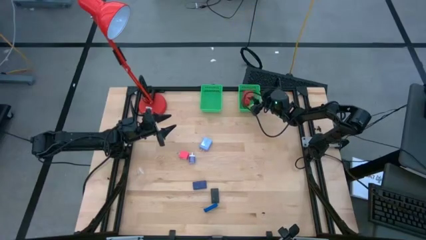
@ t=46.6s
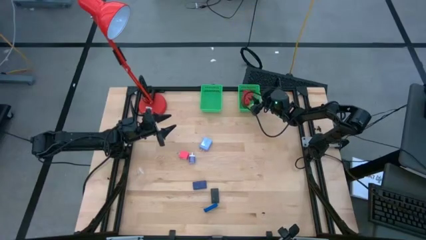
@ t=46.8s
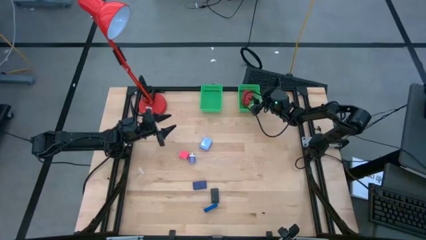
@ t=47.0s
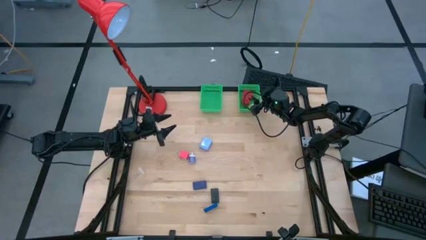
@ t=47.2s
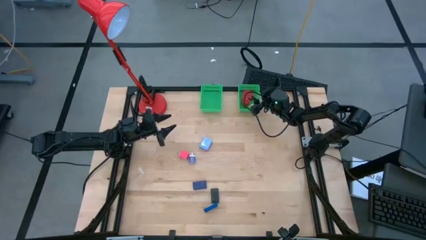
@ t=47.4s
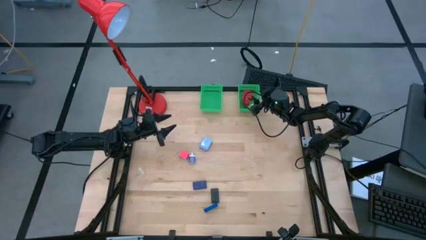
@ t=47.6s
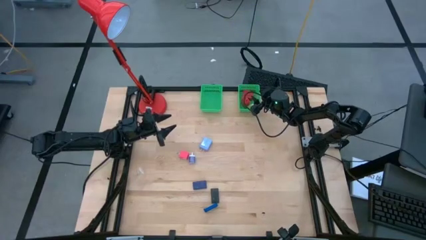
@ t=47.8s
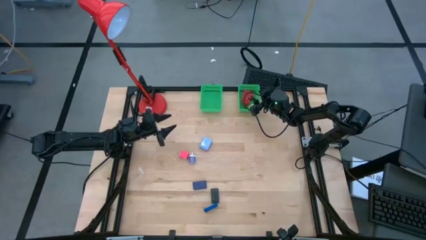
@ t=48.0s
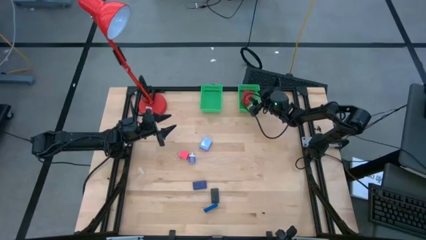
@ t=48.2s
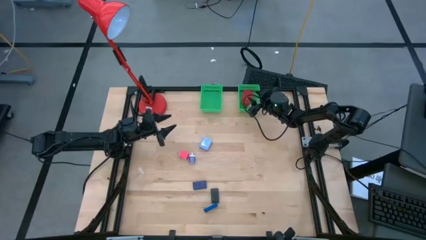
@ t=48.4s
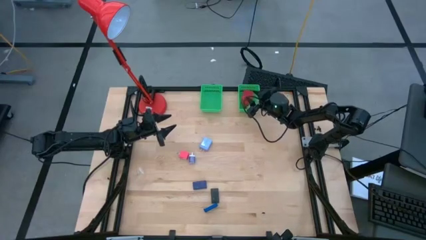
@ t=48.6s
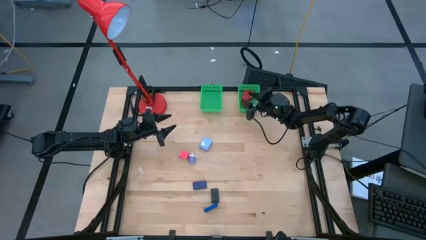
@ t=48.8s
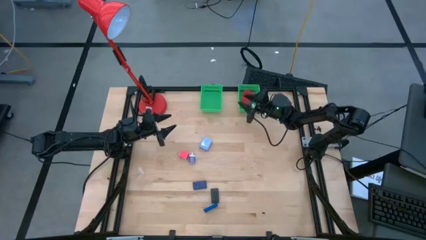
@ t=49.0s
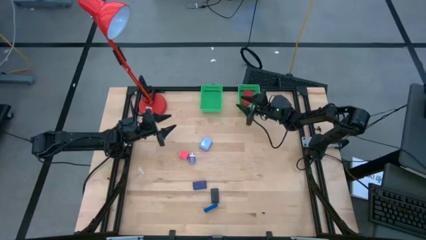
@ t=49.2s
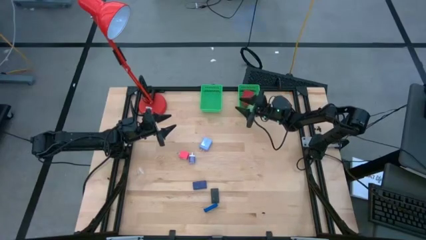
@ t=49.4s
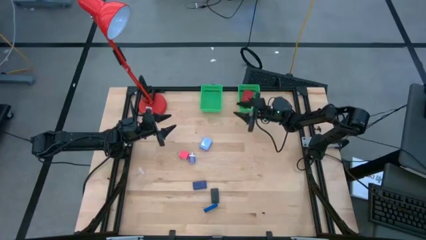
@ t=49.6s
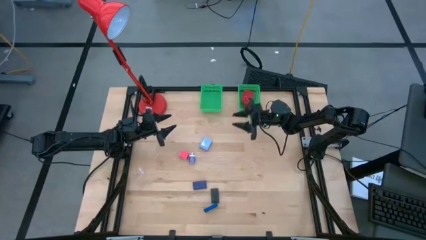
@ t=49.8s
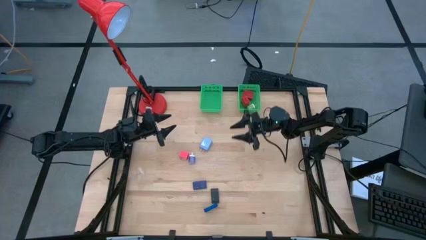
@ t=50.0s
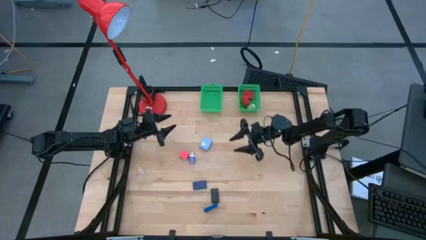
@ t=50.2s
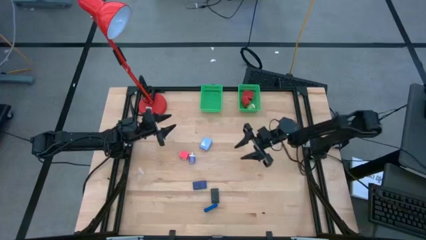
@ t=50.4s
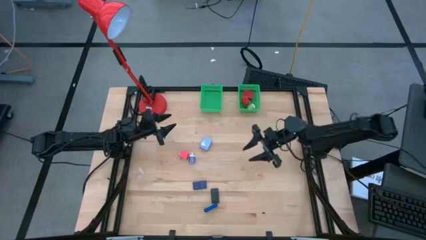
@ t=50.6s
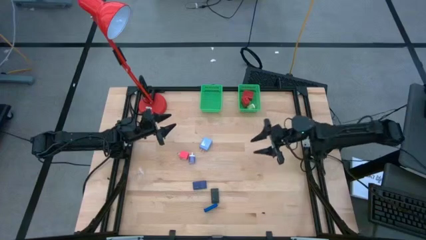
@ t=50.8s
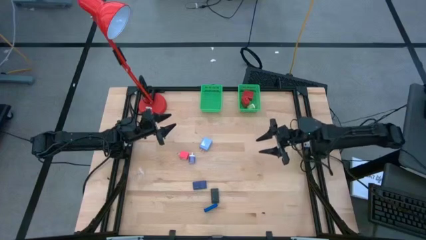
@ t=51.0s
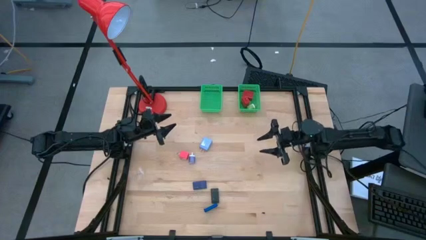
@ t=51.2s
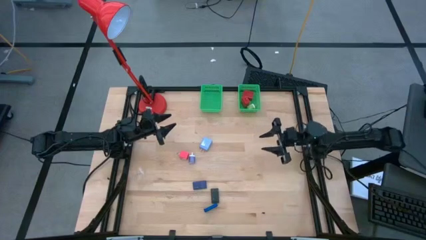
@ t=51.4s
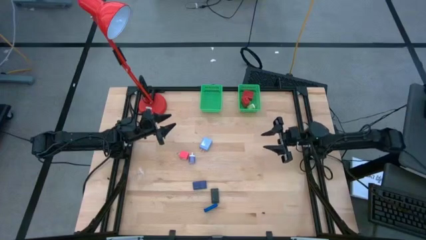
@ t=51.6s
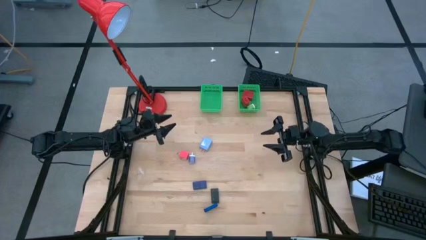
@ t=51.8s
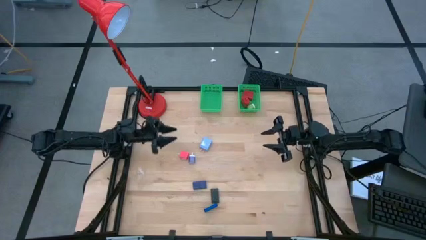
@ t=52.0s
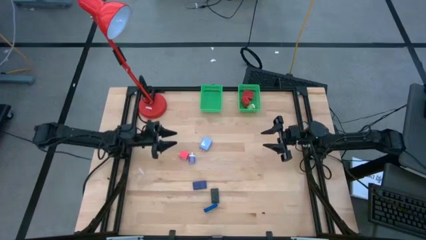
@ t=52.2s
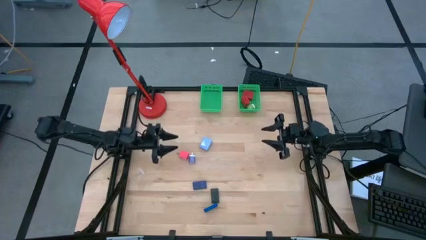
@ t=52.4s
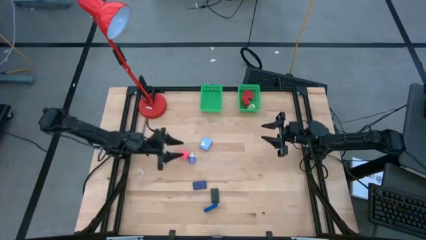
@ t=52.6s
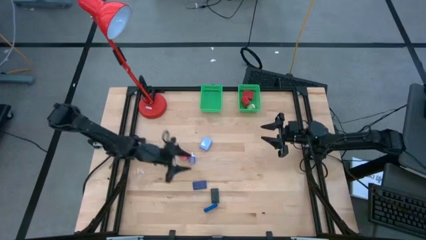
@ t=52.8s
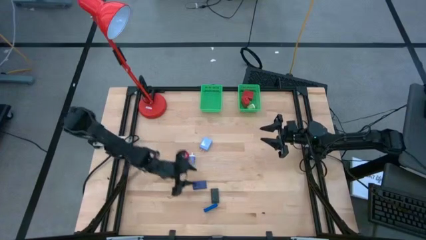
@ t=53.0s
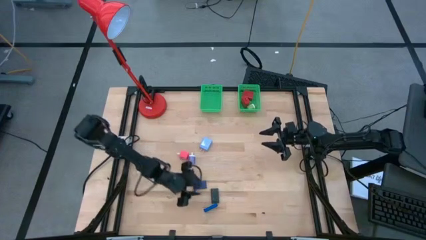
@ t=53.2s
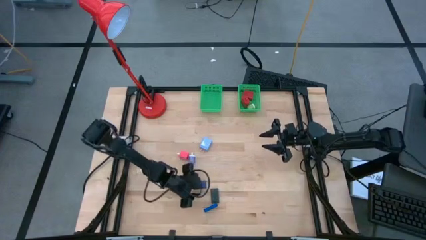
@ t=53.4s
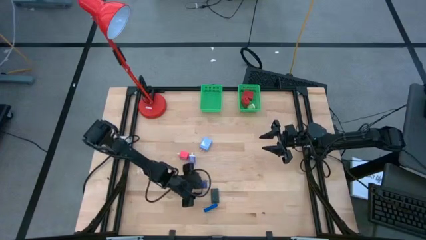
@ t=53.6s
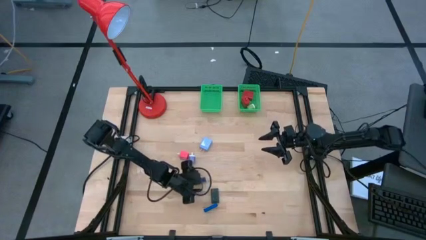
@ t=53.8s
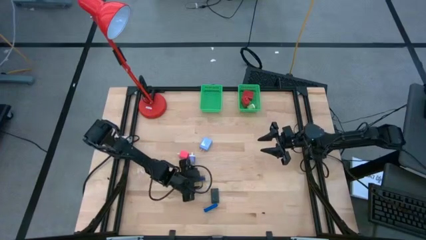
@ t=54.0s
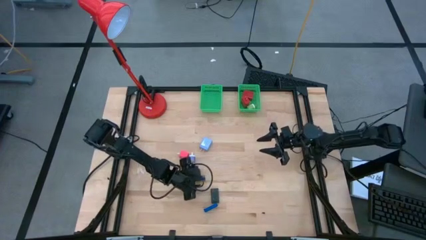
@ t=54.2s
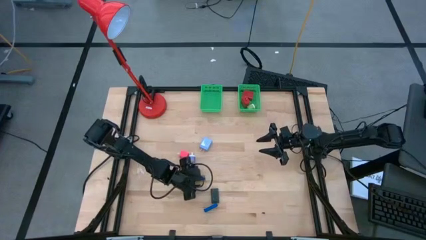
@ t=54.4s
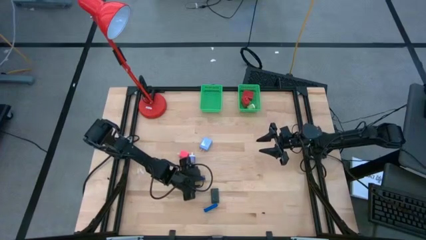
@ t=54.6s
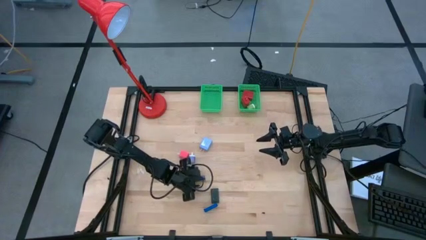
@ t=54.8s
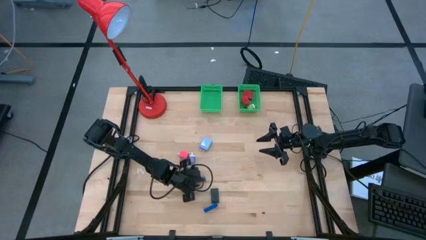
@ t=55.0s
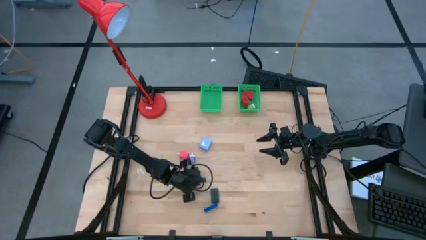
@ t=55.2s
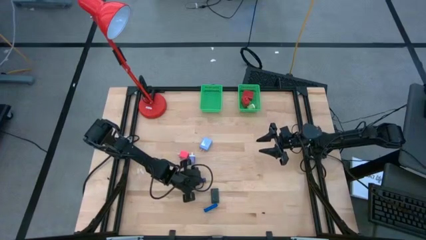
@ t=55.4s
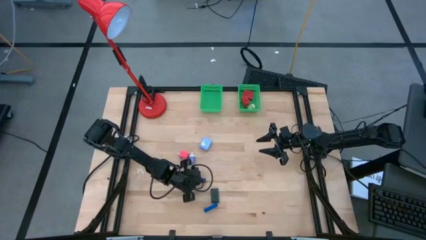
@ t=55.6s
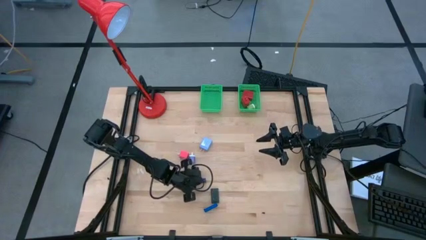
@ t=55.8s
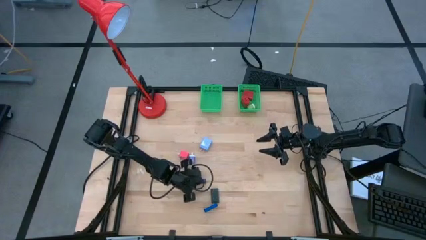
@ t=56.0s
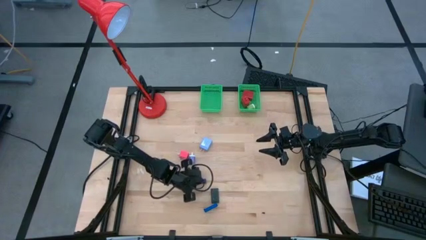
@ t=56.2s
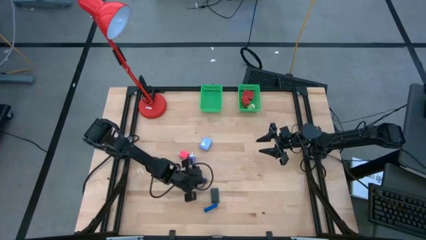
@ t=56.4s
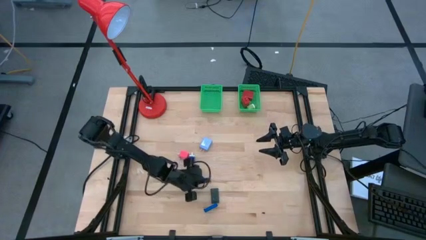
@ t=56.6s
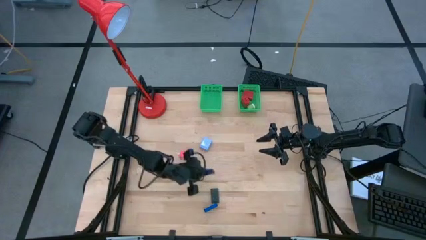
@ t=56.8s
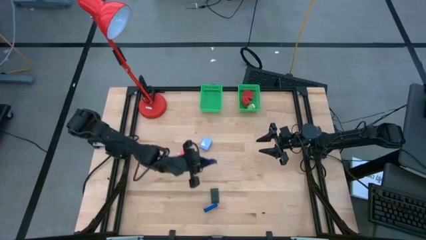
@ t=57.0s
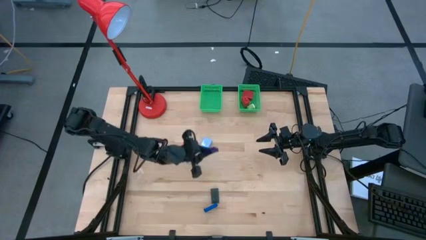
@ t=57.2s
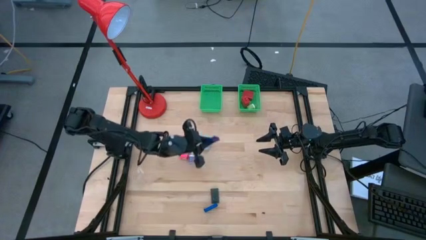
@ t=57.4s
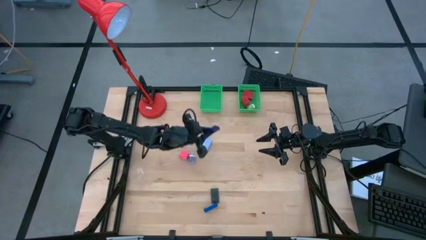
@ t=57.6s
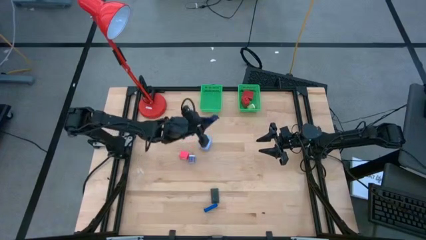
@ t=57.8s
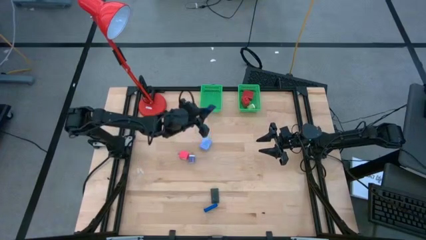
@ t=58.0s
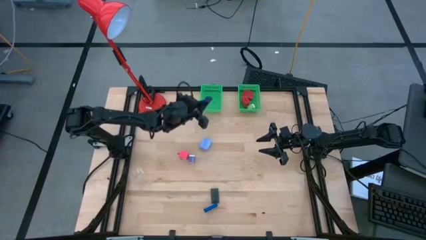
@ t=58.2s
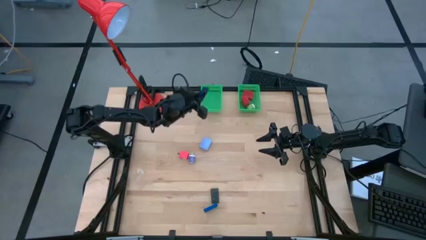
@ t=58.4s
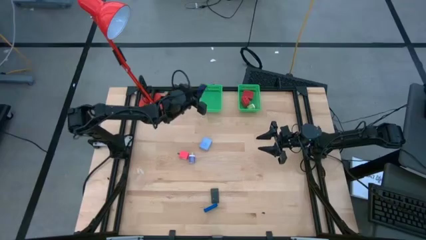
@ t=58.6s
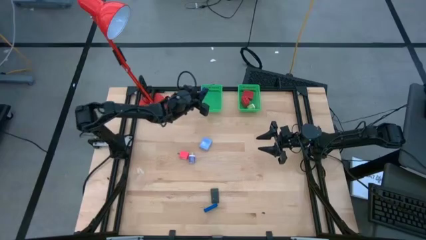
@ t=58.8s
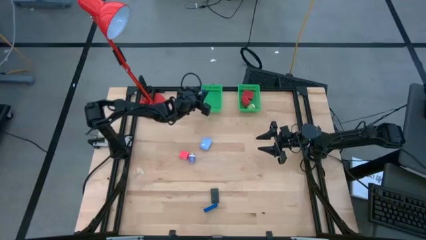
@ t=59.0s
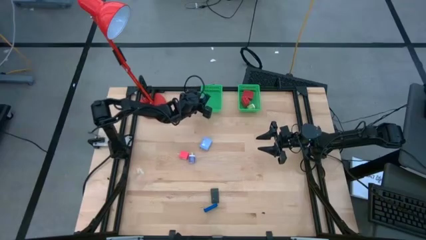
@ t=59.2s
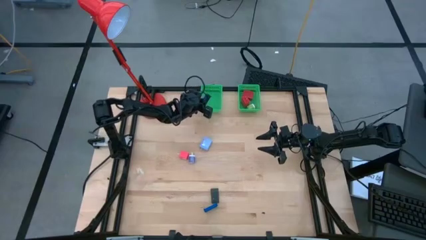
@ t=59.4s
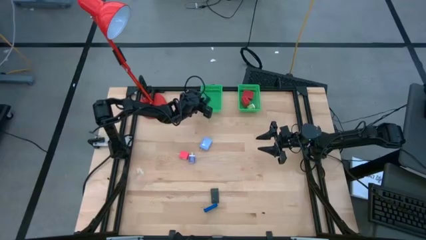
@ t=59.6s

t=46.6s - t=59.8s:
Task: Pick & Place Office items
Put the top blue digital timer into left green basket

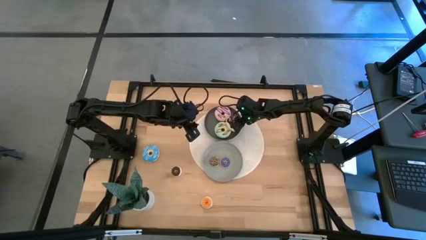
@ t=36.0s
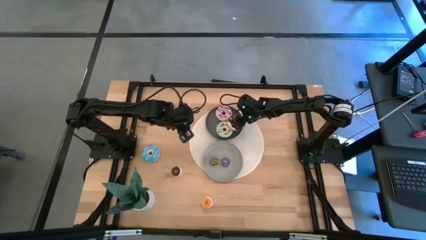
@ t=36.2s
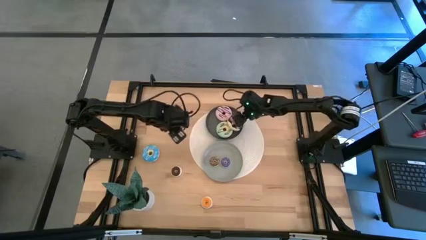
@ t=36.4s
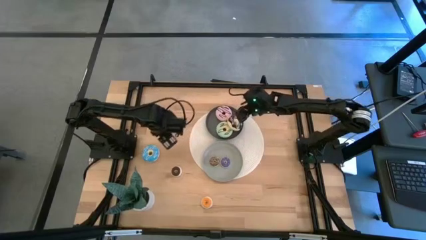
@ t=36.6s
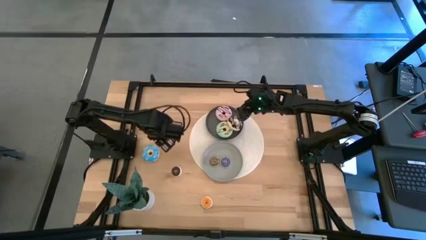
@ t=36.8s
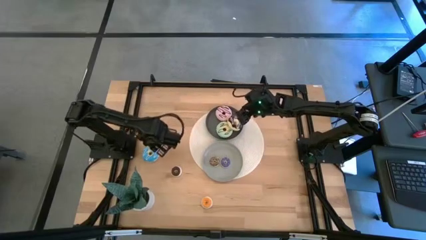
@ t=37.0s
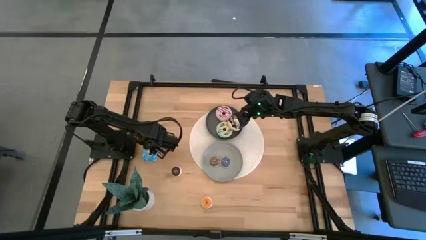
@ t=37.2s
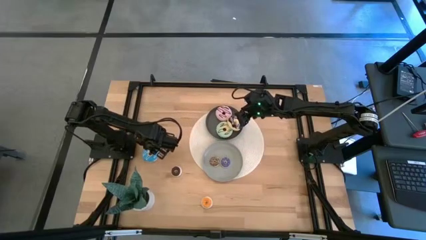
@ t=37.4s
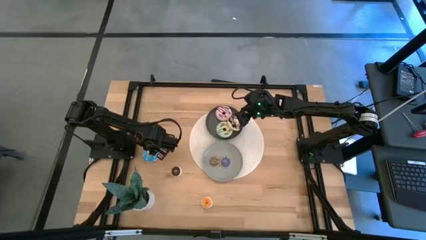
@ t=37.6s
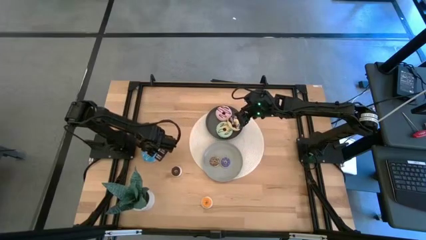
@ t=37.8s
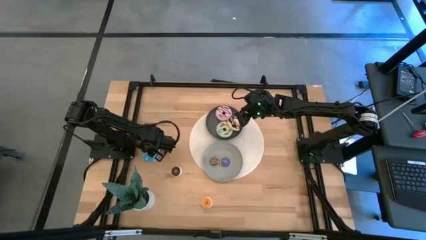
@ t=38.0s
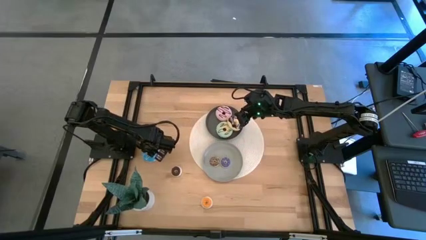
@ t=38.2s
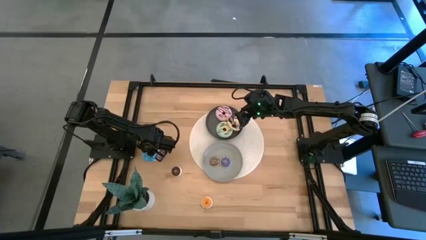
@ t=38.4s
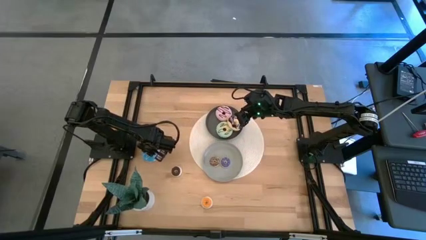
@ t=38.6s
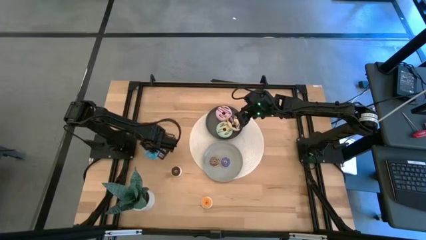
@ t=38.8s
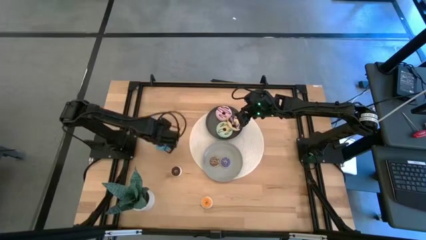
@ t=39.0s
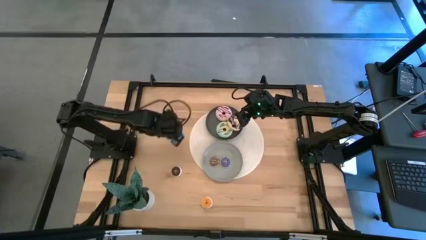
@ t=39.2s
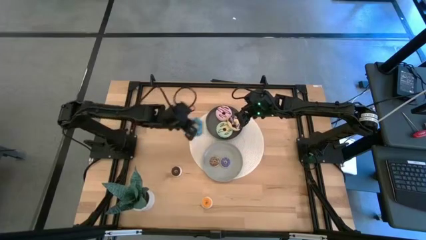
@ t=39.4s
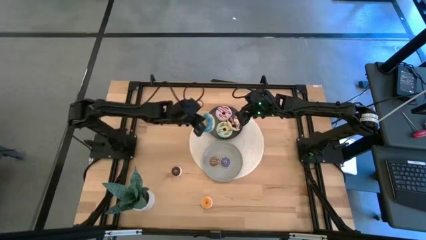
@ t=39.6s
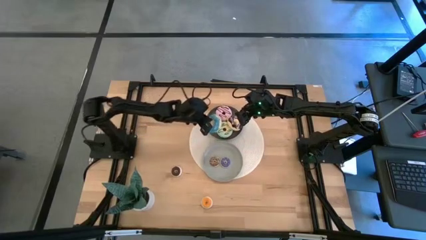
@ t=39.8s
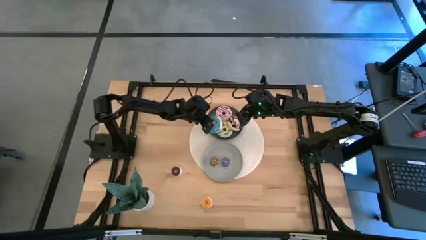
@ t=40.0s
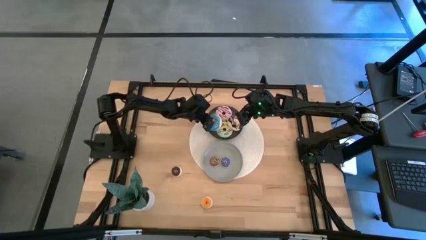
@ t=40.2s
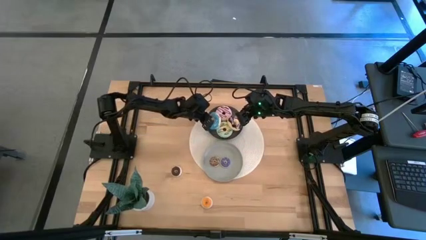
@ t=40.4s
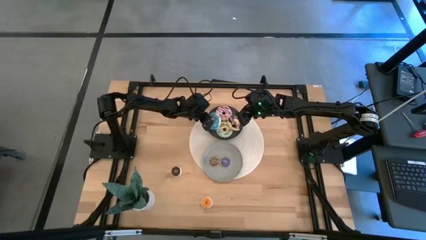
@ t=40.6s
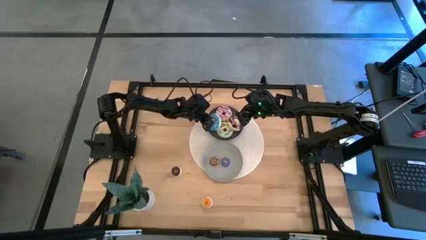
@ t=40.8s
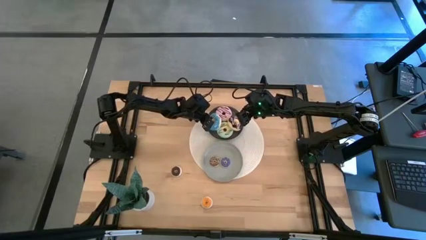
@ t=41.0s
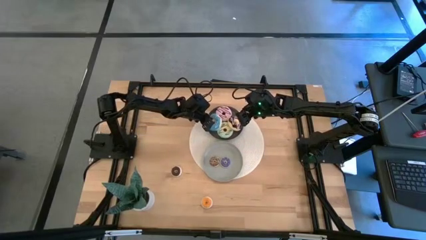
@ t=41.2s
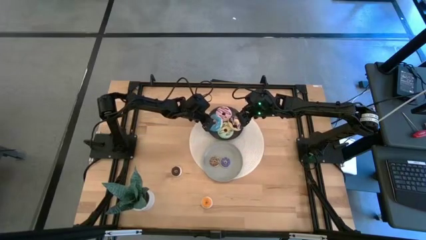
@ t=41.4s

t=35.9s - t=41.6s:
Task: Pick & Place donuts
Put the big blue donut on the black plate
